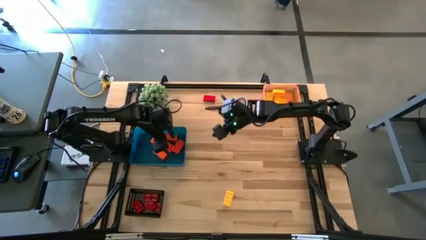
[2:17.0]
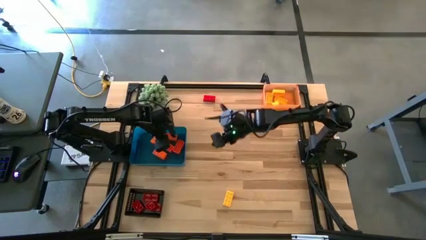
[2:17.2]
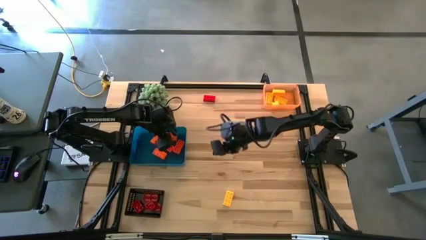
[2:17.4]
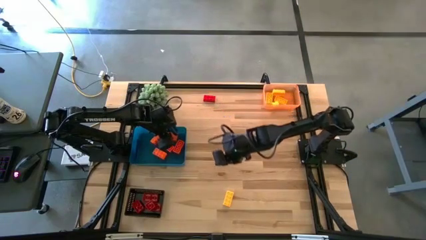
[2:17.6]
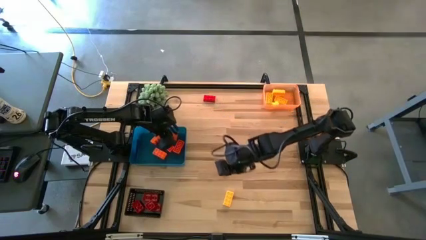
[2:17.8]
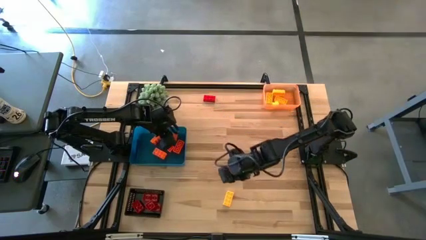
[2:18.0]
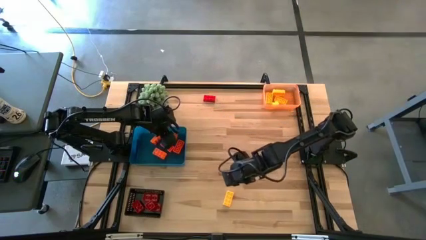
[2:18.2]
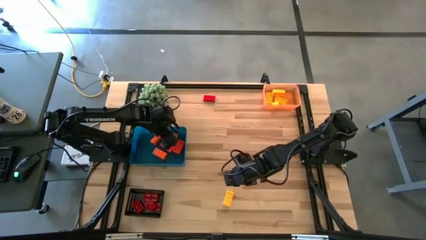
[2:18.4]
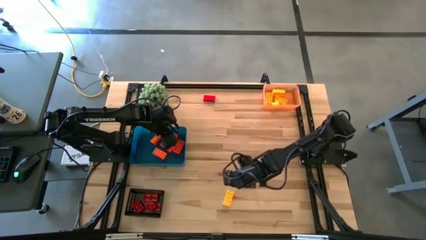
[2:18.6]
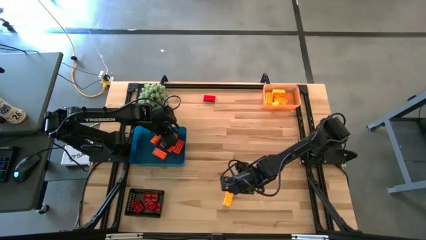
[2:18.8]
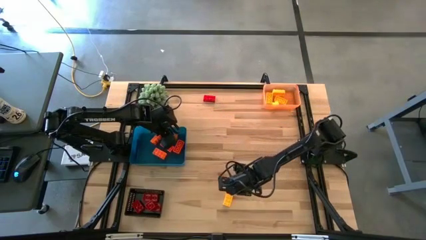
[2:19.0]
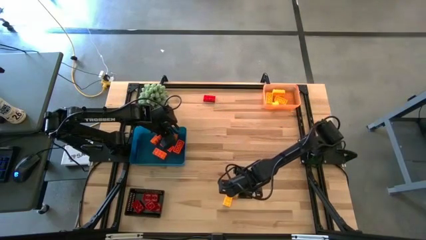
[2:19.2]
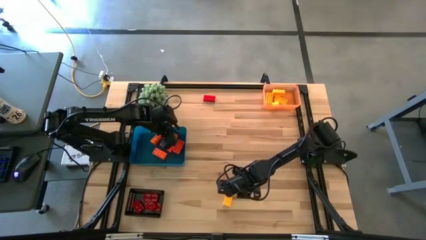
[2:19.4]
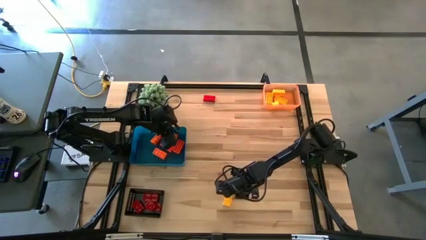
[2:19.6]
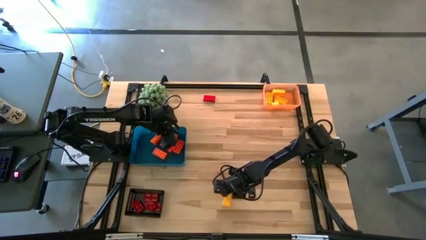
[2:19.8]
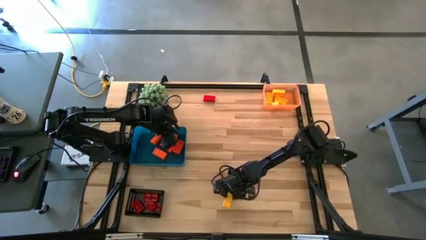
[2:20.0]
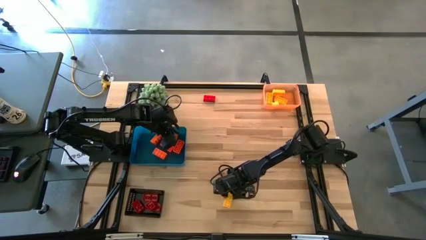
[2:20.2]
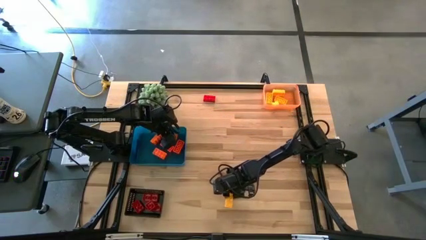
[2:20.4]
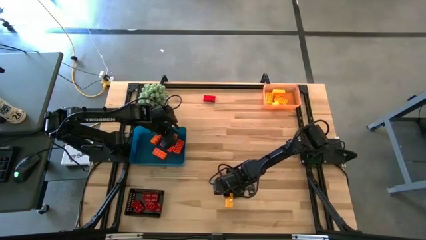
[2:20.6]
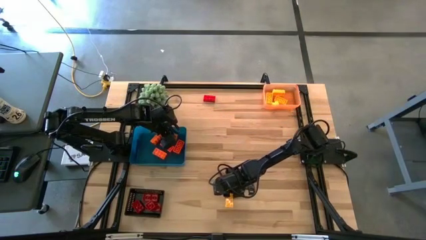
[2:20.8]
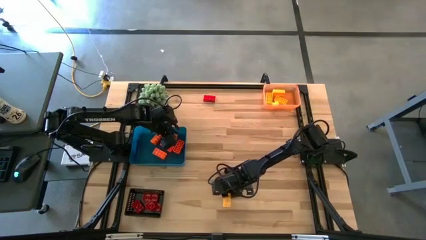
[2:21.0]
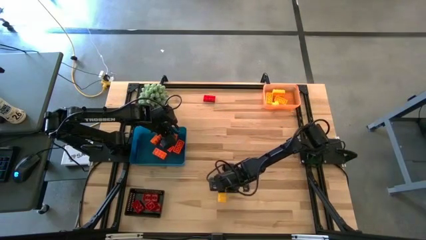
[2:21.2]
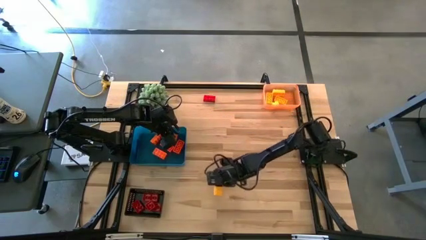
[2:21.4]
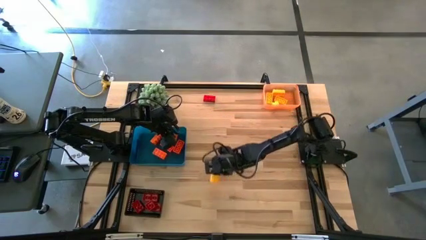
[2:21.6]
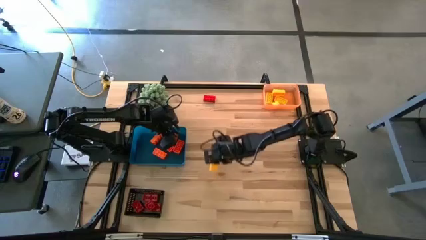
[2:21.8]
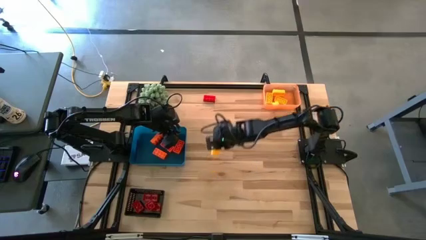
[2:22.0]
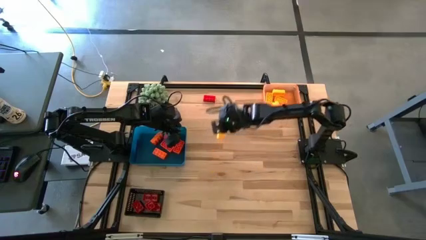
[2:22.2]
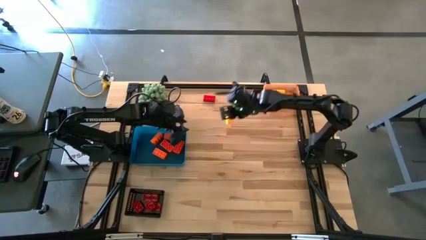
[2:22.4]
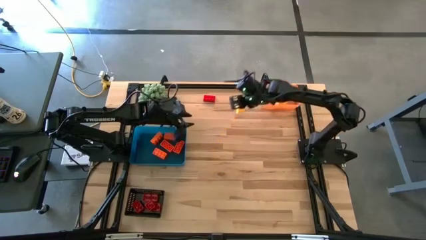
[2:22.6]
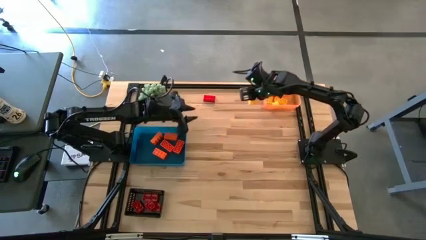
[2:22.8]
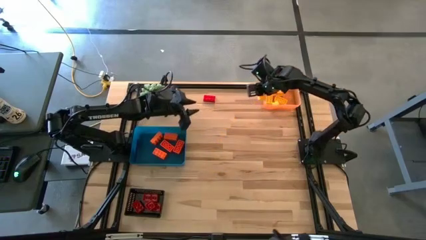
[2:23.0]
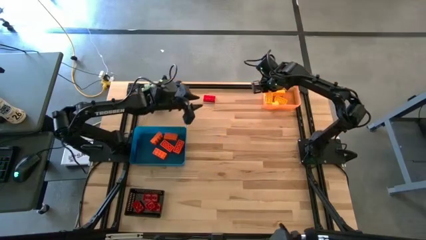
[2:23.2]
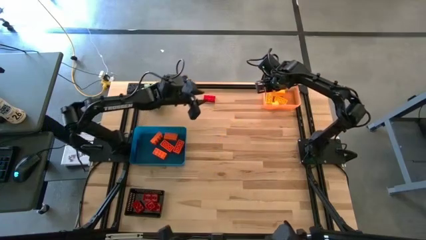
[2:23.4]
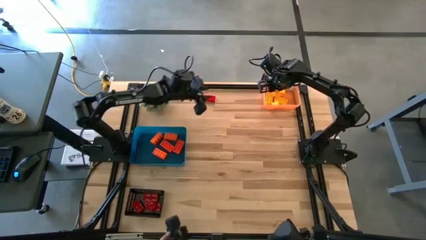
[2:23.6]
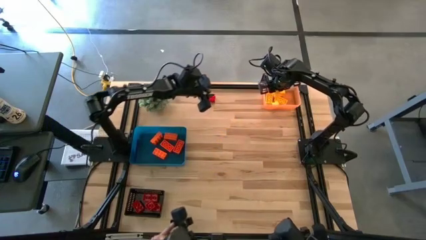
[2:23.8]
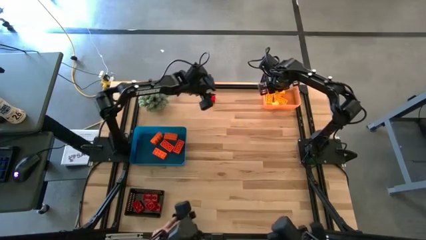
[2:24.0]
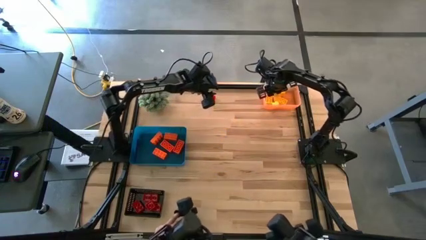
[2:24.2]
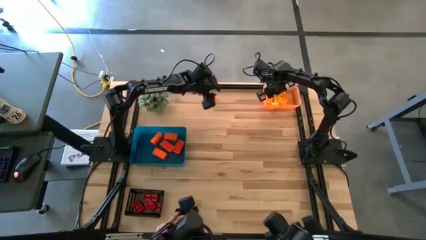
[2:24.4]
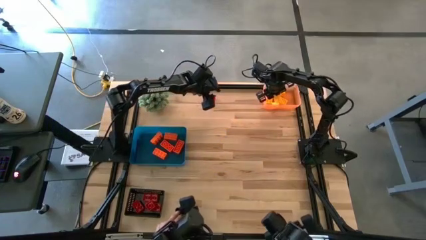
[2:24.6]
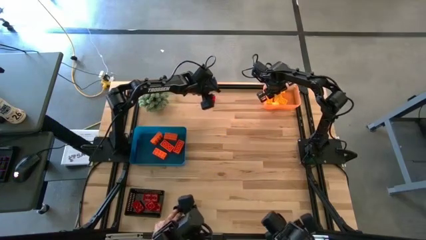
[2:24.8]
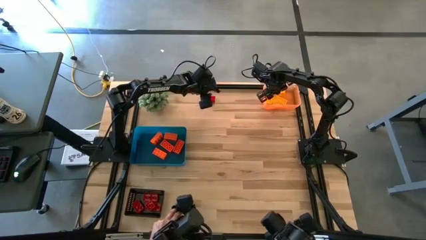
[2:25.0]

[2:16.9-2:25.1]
Task: Sort & place blocks by color
Put the yellow game piece into the orange bin

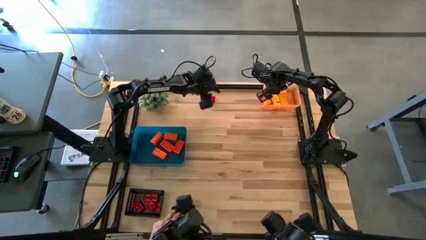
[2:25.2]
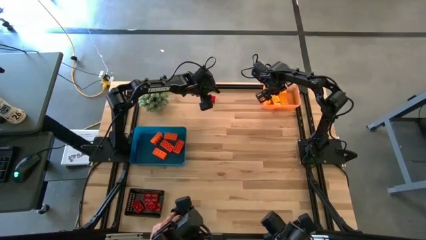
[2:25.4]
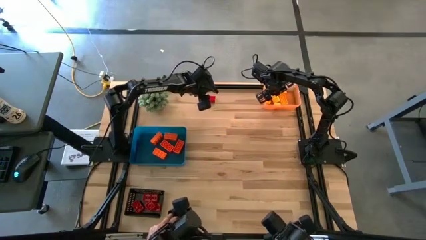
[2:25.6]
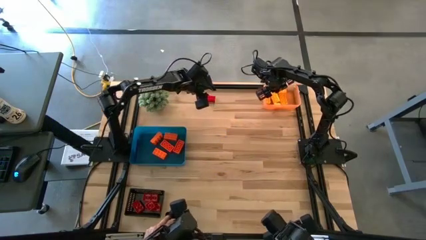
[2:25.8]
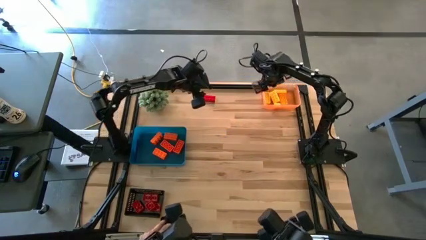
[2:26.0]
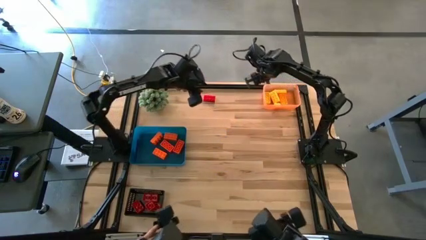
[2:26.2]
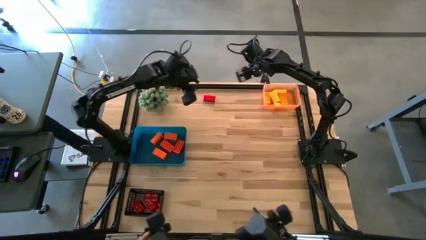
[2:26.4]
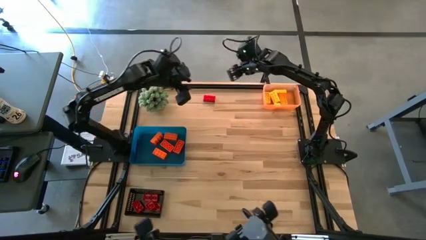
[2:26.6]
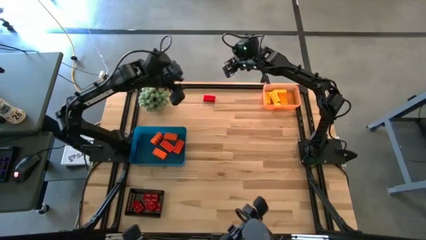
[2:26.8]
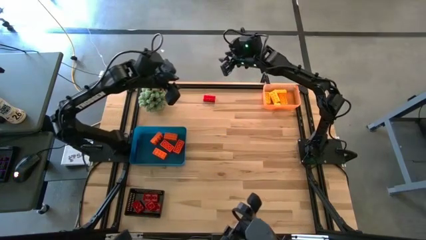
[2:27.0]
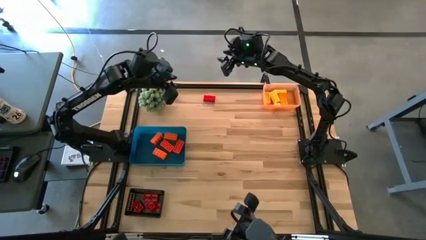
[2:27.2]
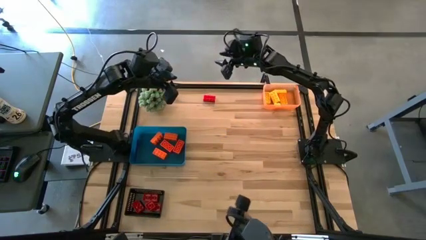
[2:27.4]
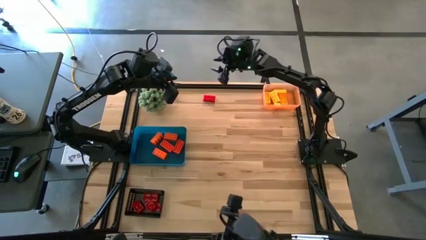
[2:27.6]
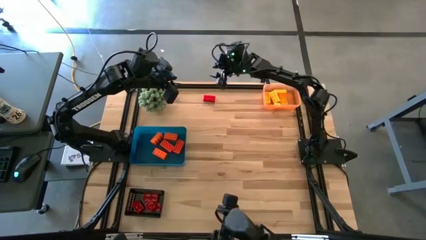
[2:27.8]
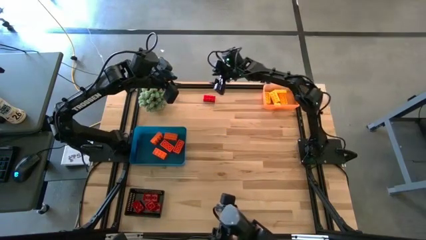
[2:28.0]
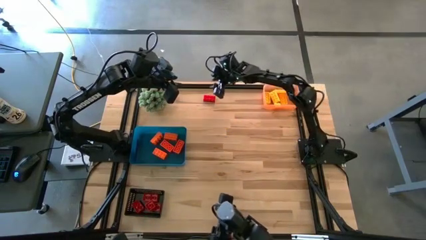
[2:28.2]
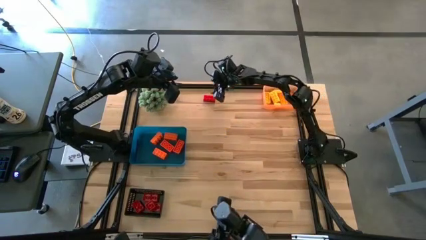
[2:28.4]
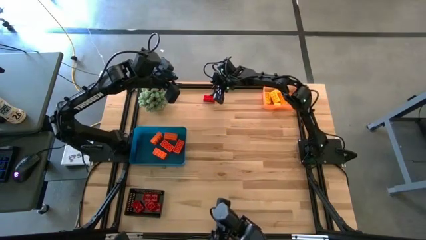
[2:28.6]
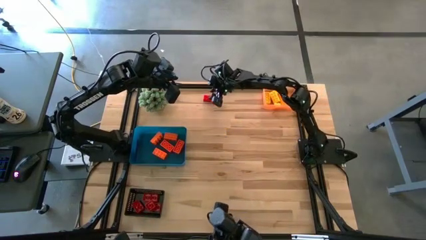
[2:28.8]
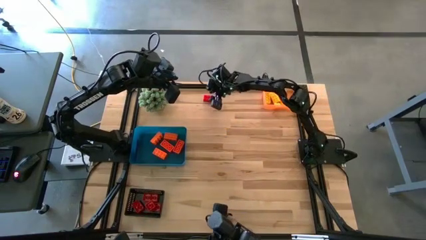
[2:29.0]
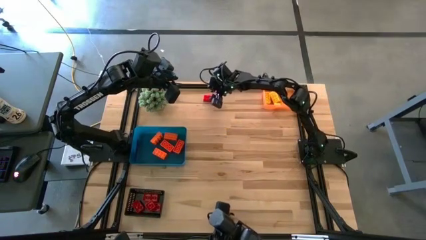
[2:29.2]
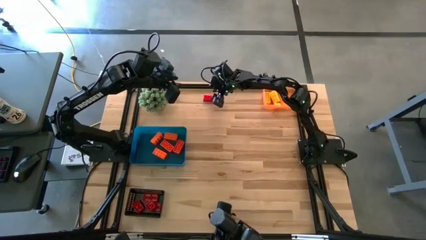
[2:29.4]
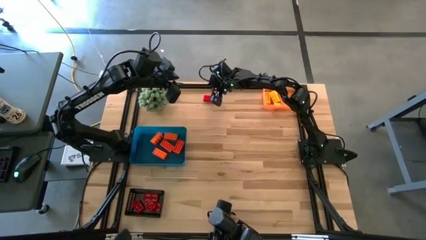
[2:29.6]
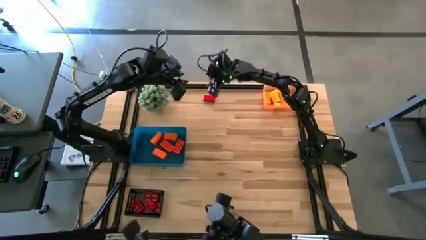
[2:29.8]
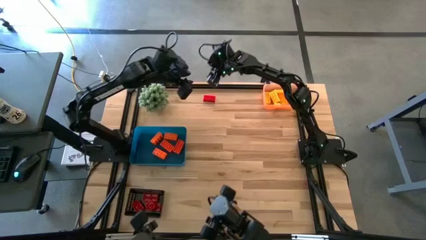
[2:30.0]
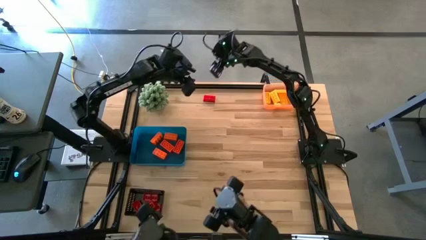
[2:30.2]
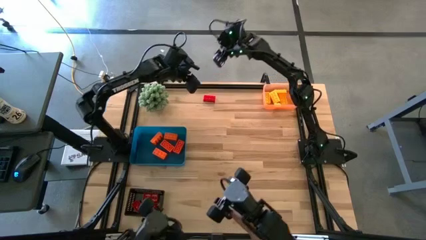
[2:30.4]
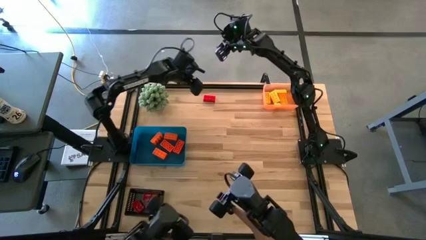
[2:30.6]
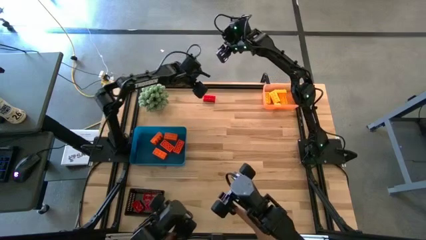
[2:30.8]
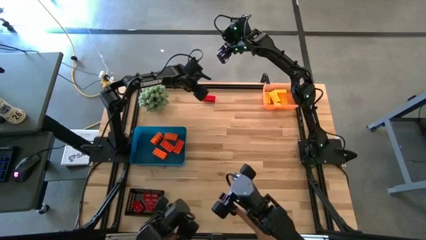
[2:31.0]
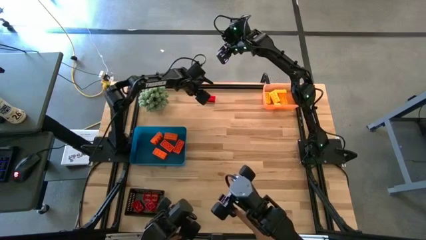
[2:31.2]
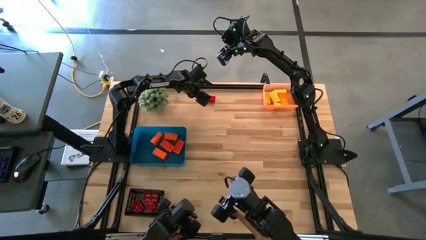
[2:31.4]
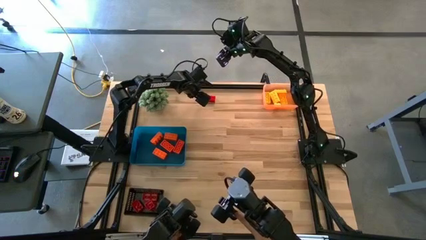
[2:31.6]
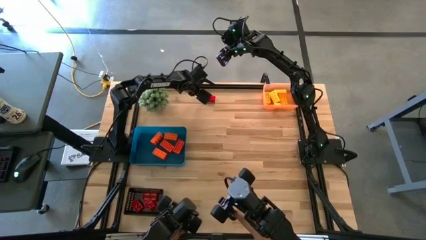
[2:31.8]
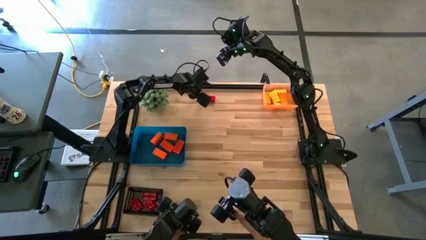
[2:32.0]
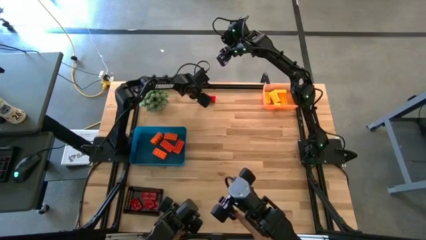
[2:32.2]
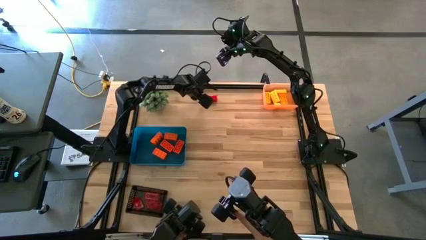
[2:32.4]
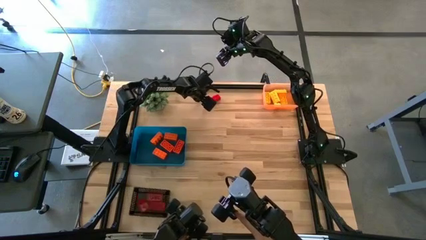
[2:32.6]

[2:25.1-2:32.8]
Put the red game piece into the black bin

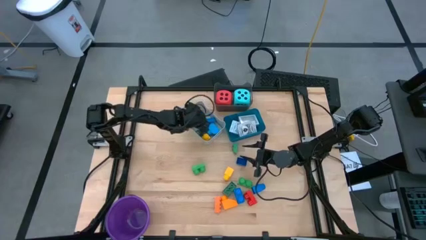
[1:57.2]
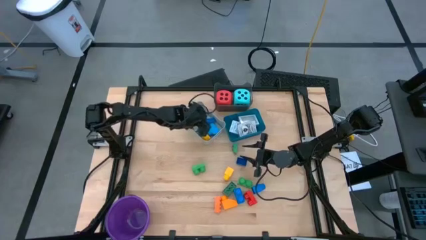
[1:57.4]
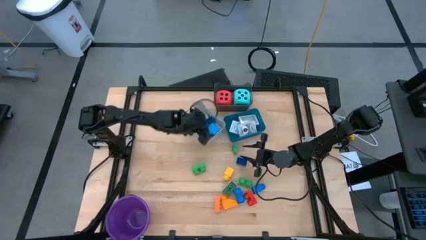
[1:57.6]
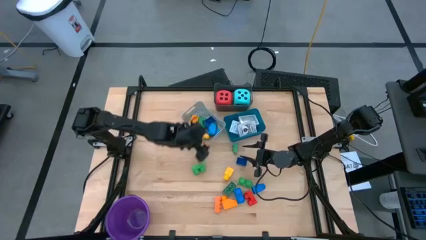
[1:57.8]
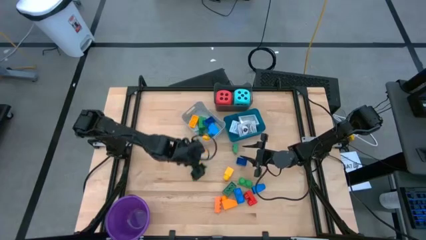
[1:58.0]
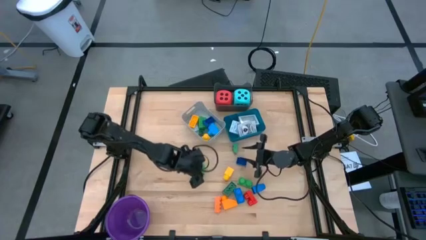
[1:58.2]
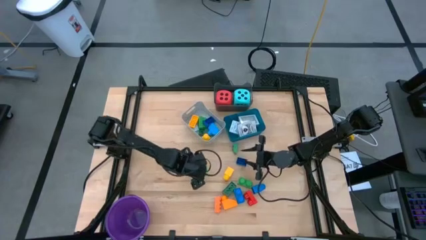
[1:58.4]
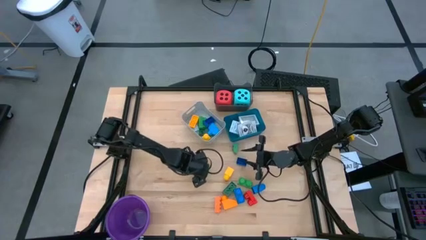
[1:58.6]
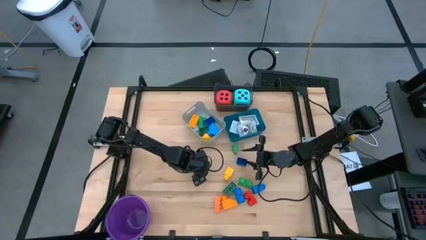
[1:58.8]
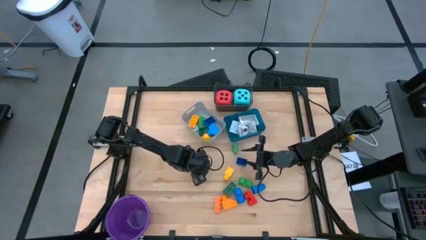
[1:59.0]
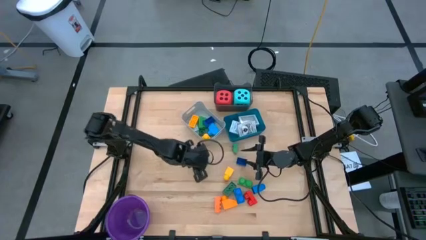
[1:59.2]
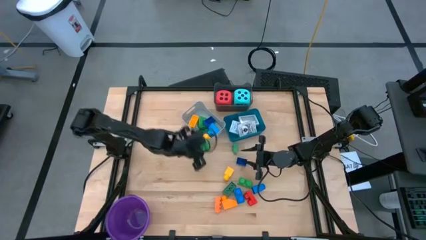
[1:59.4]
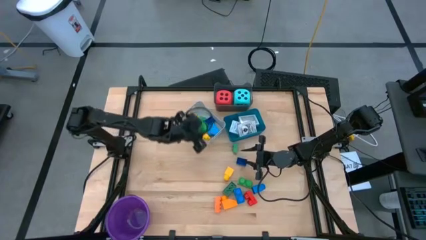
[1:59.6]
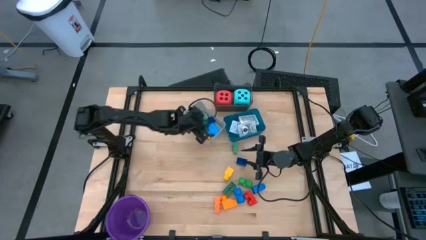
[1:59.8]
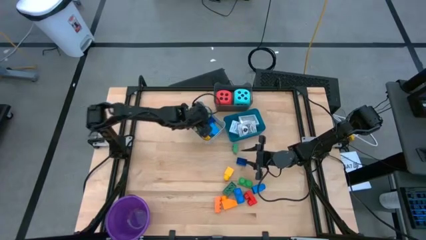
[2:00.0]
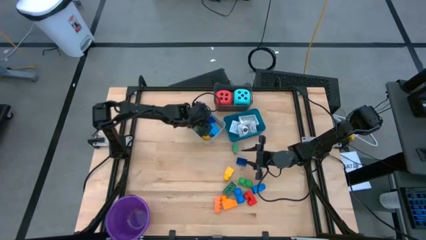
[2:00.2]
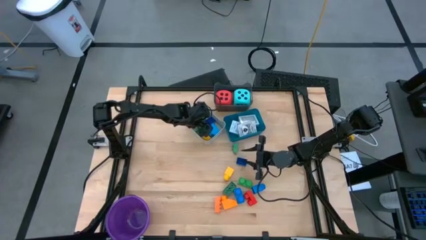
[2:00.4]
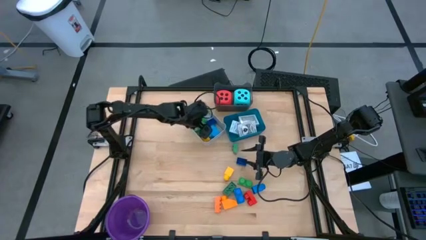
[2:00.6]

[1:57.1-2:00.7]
Task: Pick & Place Toys
Put the green game piece into the gray bin
